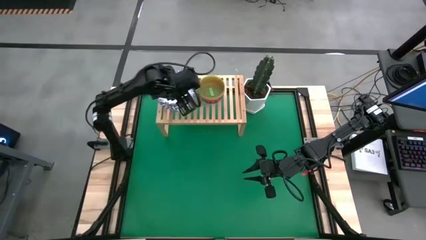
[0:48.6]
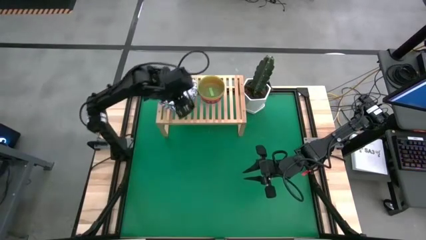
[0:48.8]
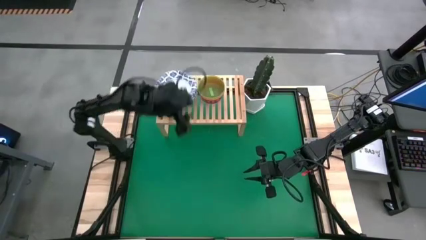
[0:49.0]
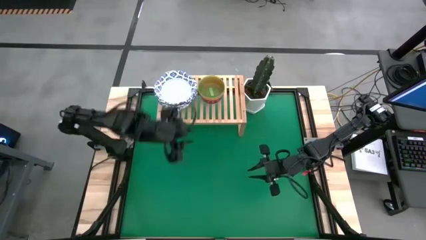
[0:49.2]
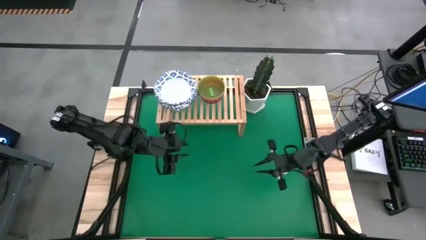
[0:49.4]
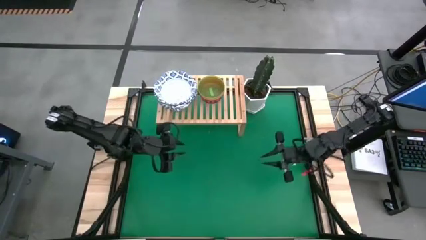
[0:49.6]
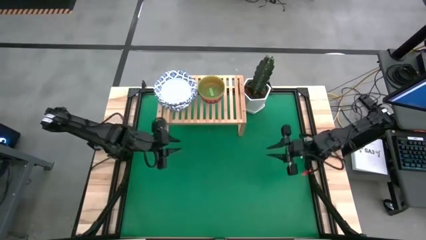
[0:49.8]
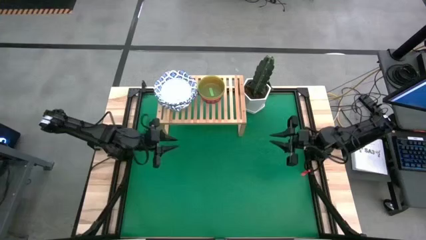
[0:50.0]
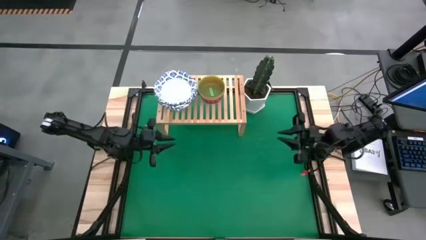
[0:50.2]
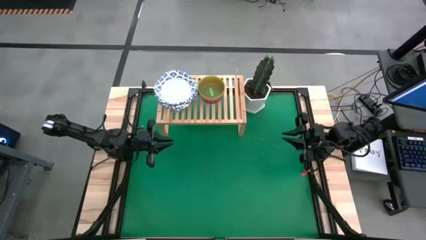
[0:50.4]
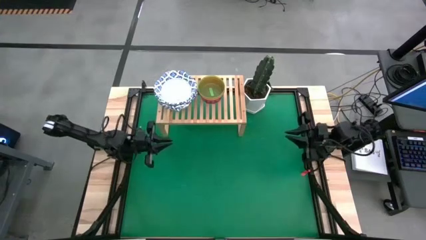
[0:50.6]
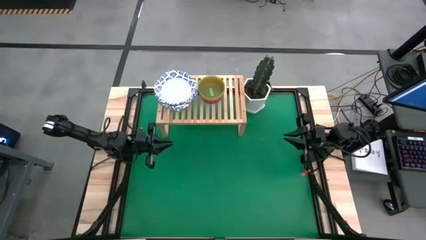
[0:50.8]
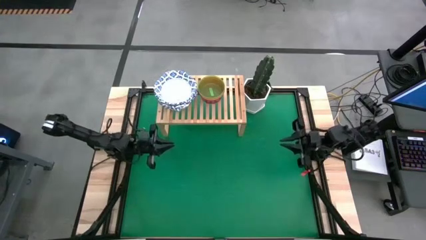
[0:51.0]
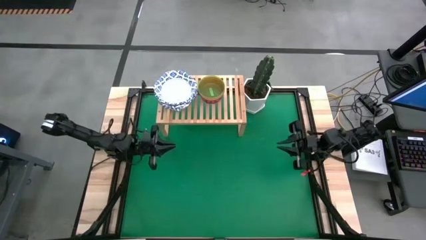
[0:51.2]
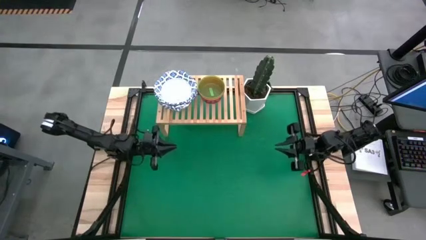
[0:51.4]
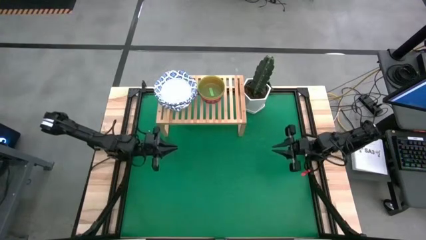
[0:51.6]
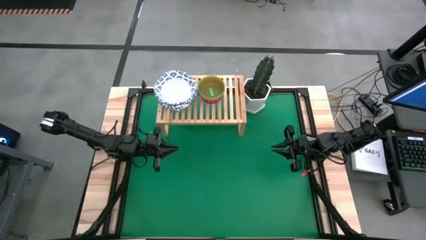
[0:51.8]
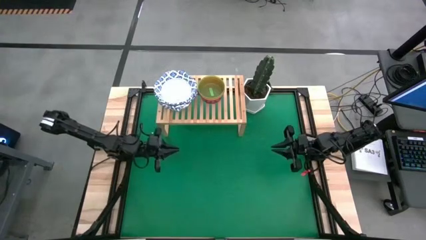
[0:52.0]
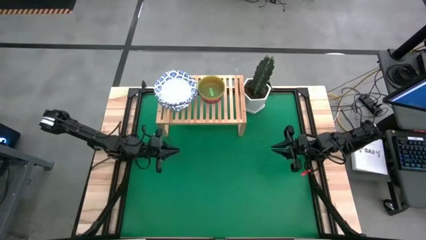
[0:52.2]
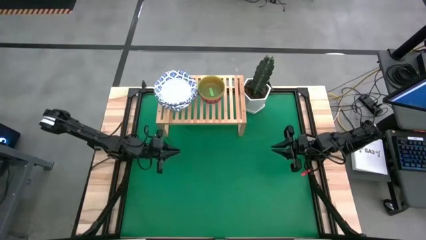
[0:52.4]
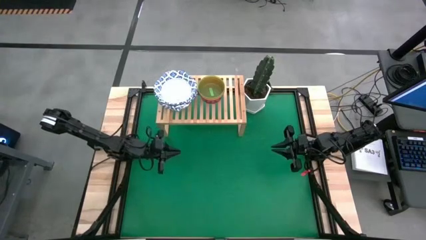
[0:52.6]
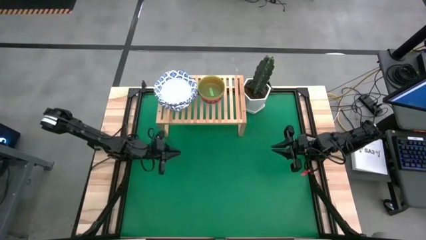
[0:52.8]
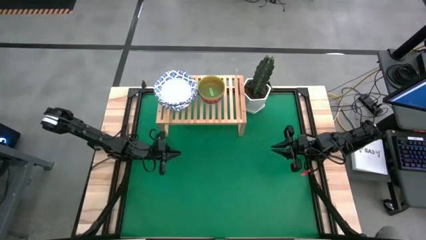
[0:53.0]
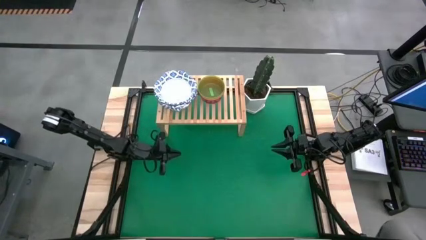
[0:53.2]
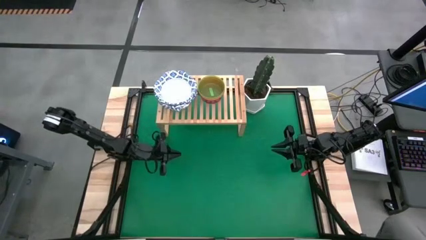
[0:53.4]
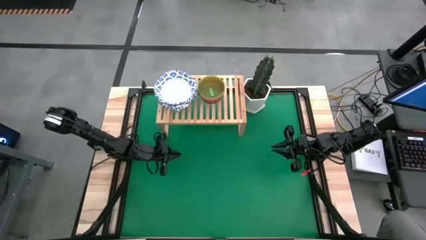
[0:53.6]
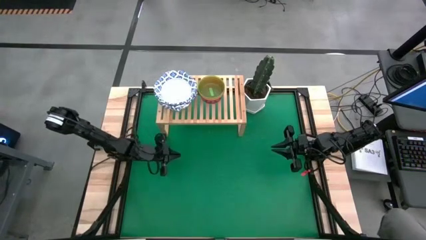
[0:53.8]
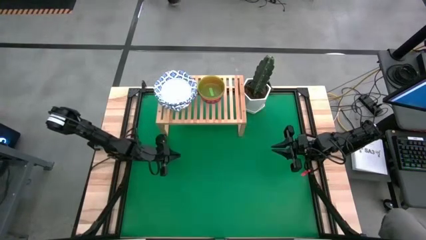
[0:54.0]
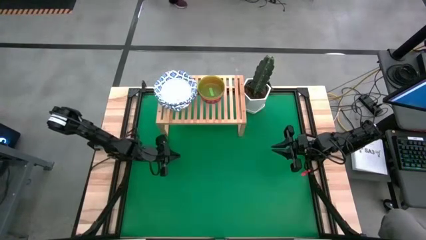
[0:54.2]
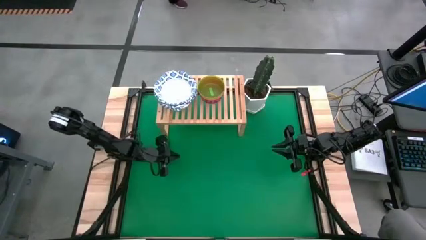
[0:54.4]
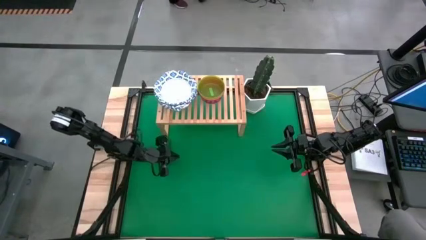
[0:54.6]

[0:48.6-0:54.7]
Task: Place and stack bowls onto a shelf
Return to Home Position

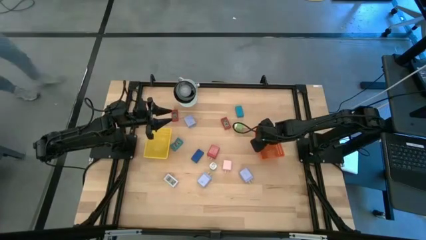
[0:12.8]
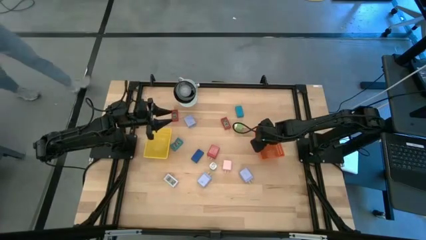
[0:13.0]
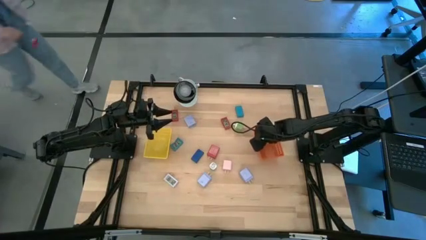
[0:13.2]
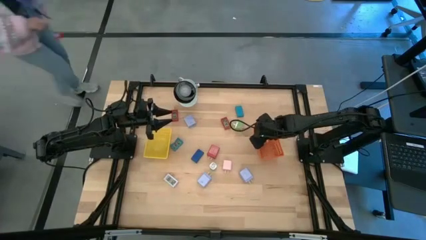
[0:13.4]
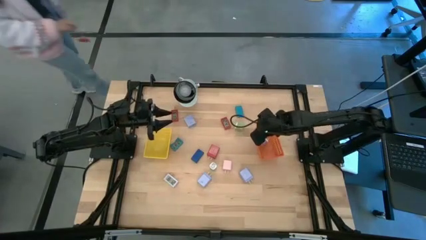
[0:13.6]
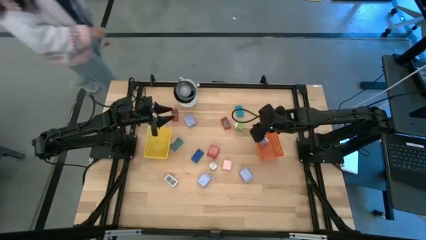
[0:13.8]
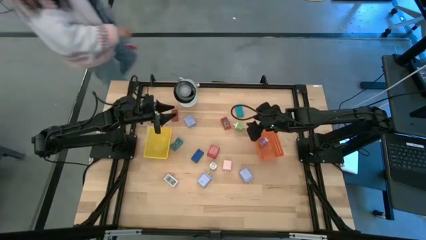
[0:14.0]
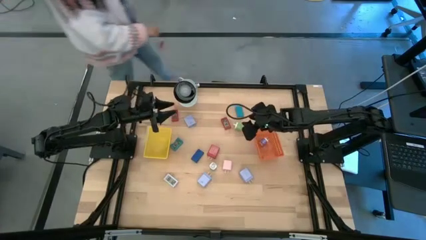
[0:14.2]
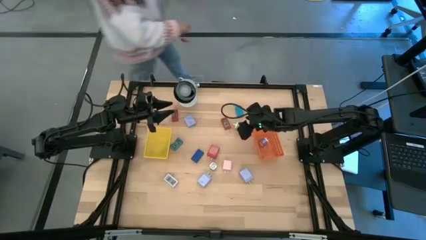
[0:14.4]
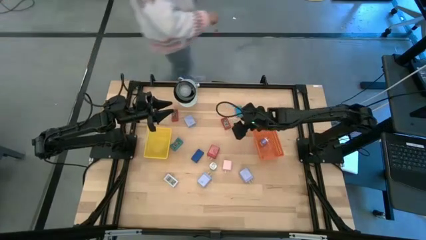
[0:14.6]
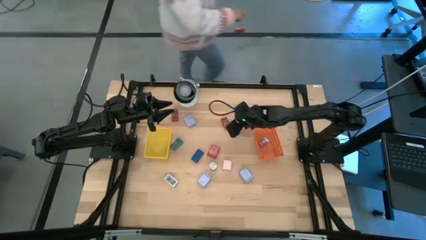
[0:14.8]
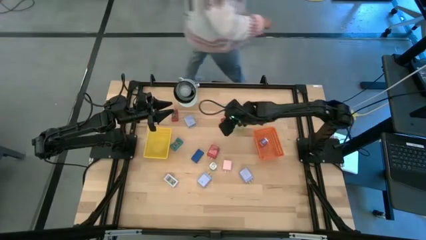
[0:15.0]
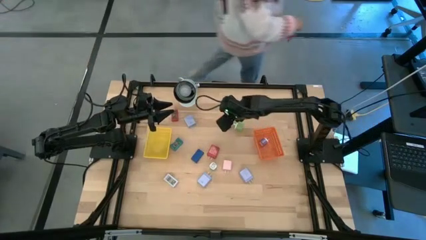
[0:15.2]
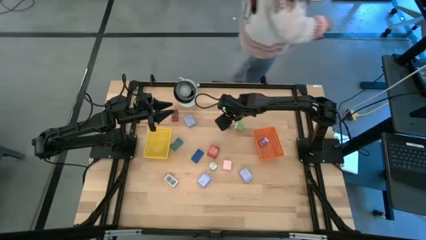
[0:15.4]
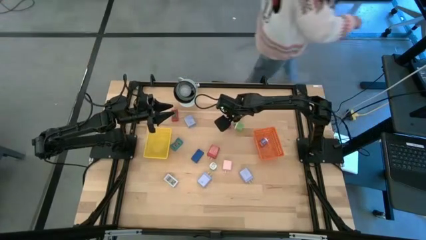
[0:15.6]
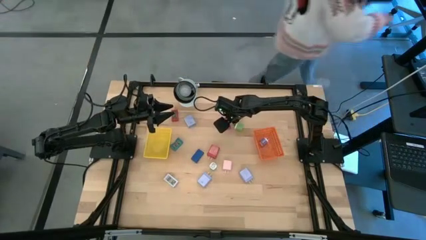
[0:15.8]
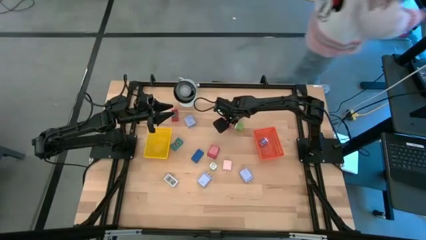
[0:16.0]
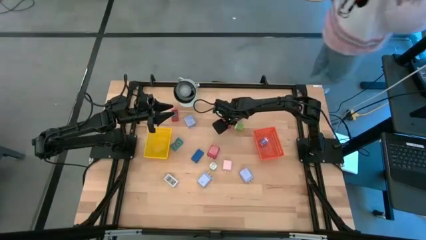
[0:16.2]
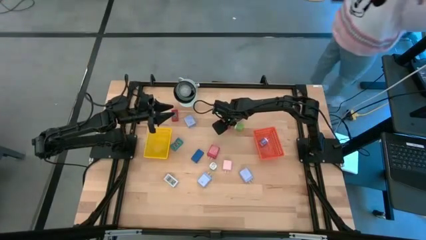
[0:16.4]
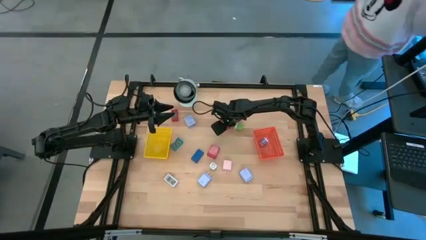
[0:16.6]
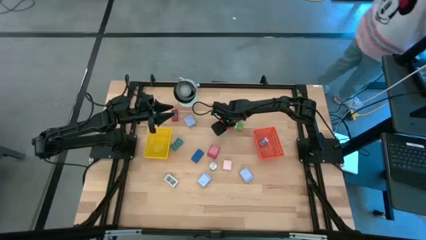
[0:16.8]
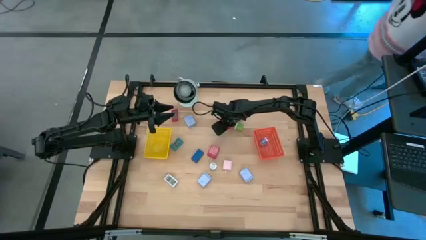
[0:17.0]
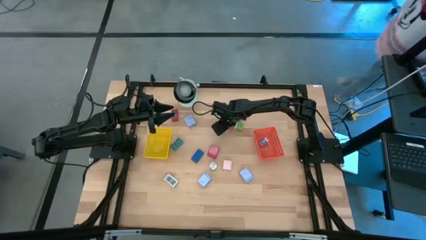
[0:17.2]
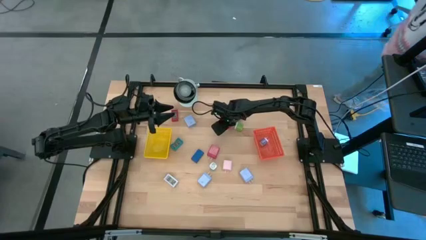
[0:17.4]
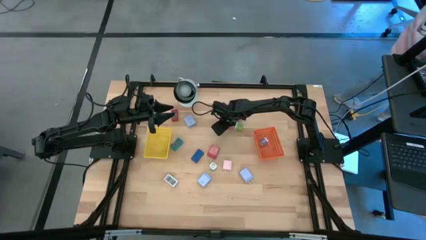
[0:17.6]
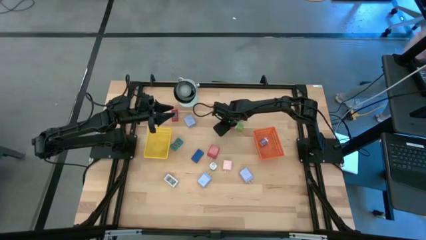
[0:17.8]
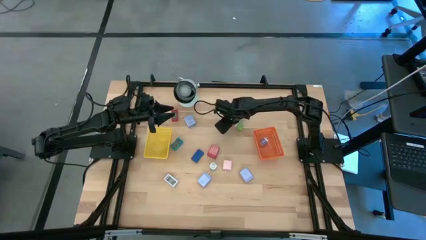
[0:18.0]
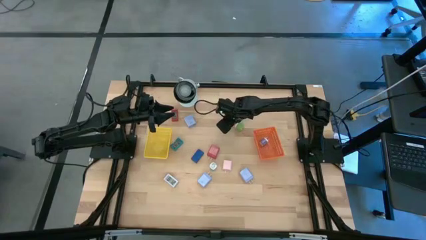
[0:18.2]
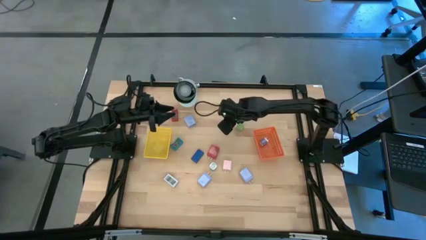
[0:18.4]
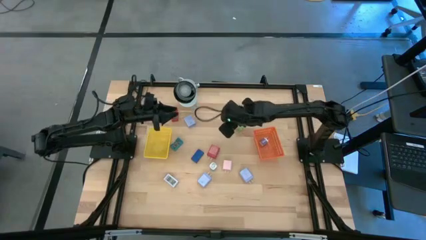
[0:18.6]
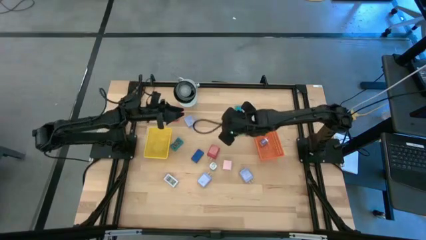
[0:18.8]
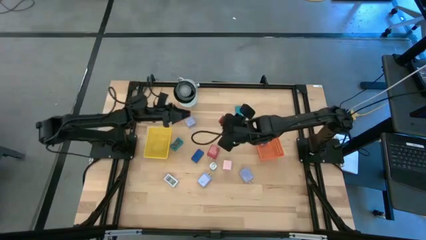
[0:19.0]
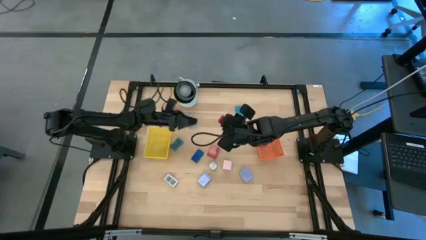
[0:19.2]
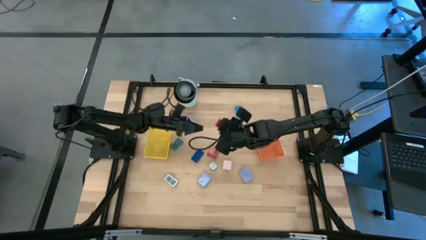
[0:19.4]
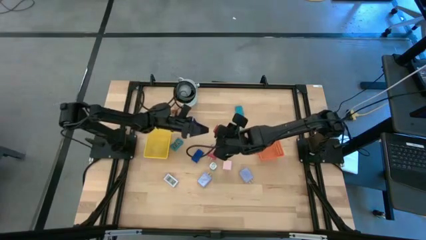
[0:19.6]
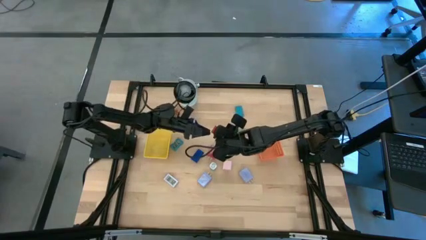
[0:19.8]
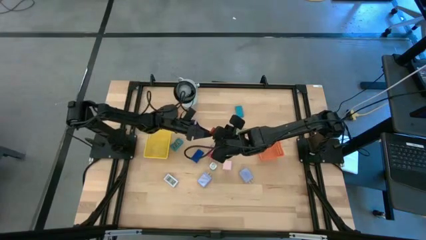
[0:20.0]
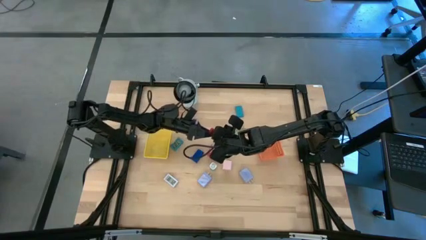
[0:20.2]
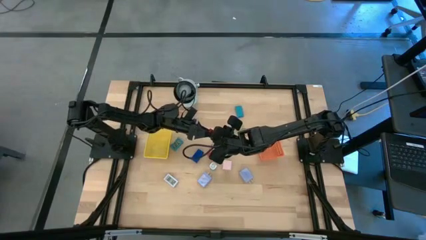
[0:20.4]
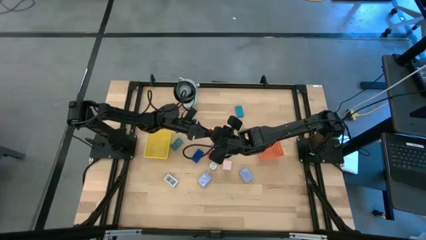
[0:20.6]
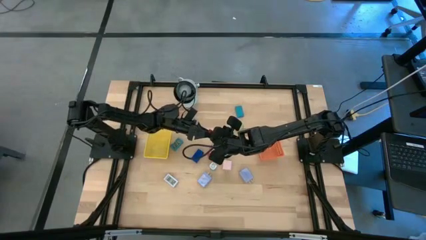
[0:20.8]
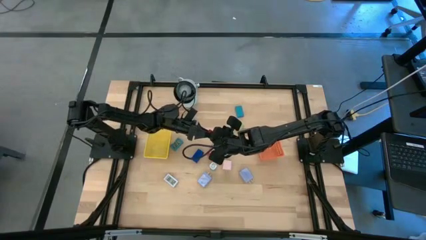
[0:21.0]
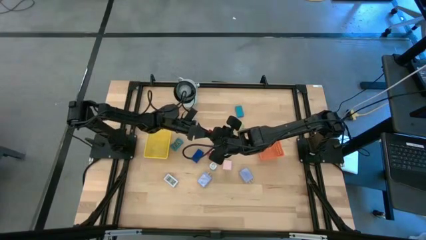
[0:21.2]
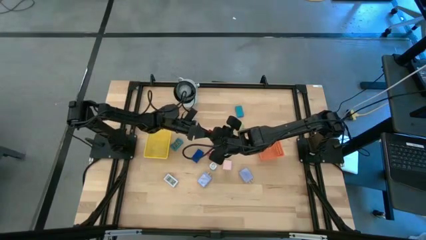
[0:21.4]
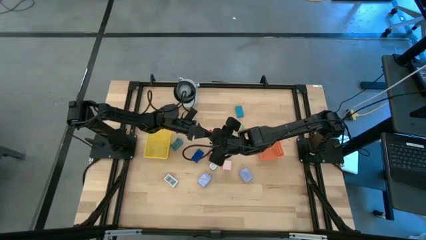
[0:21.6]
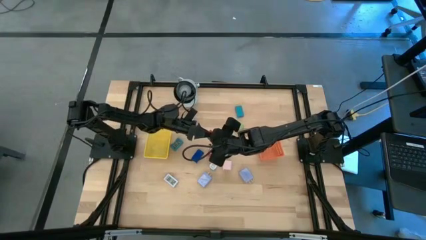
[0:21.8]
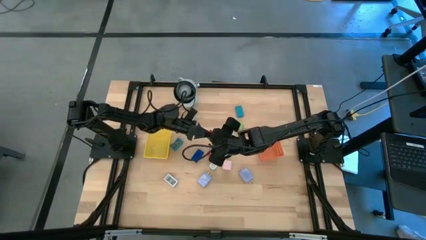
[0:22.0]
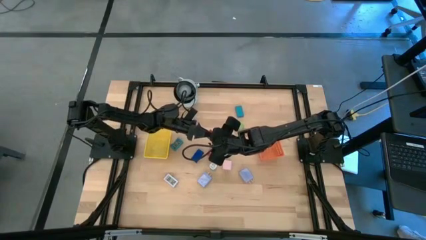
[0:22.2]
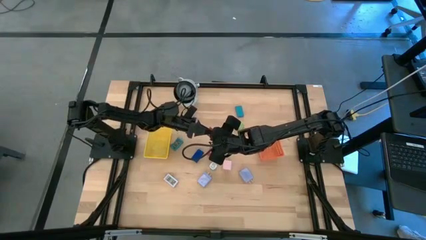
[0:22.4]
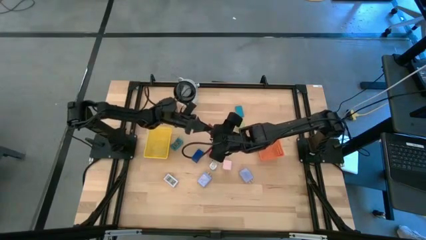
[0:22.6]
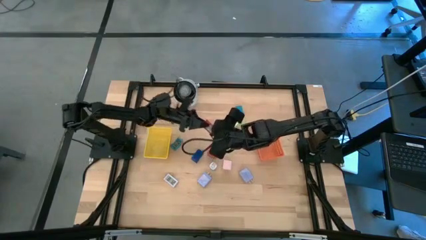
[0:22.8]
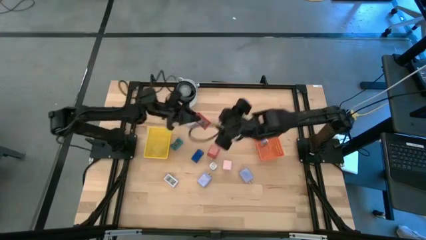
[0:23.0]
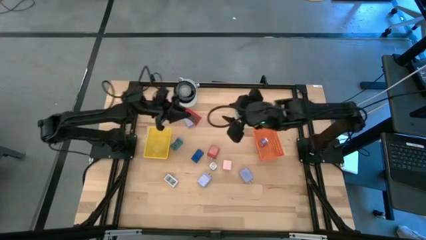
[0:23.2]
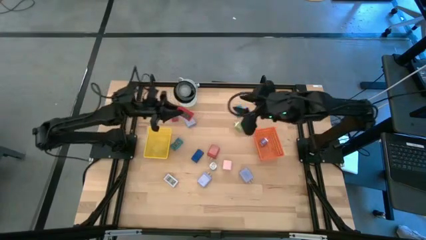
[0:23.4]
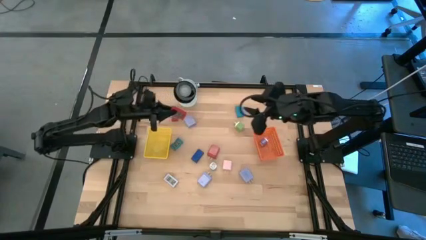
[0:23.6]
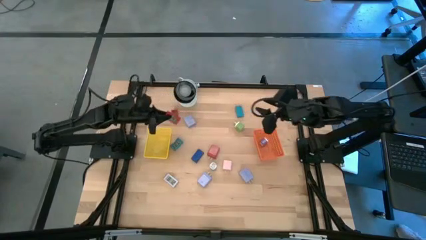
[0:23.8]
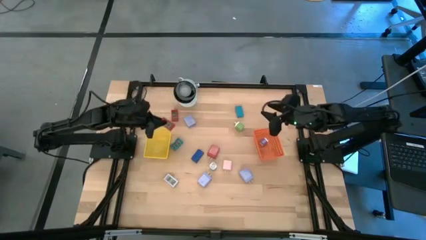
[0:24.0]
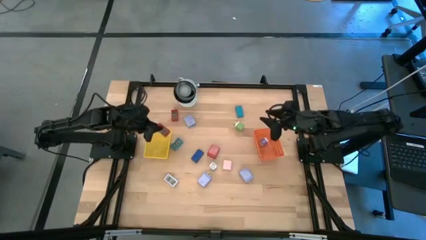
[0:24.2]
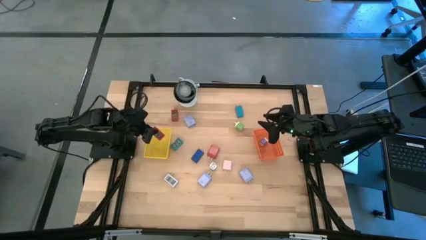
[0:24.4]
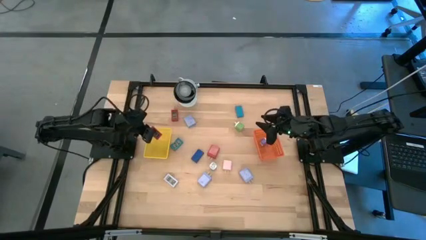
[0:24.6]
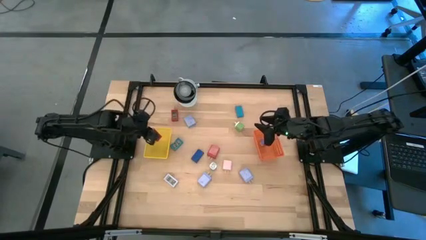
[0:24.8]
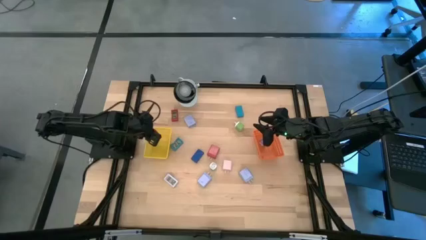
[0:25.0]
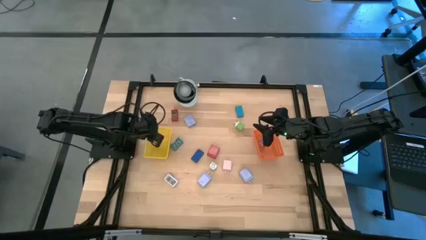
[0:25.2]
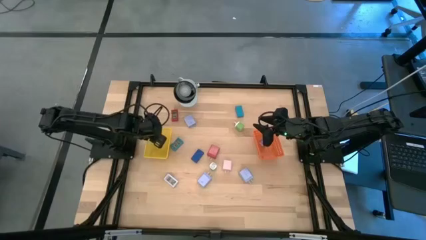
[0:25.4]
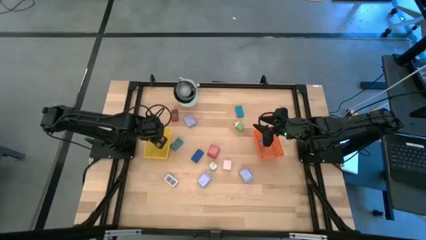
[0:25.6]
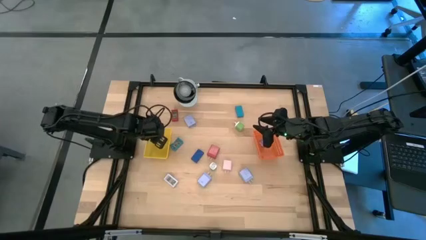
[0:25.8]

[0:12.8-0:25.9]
Task: Pick & Place Office items
Put the right red digital clock into the yellow basket
